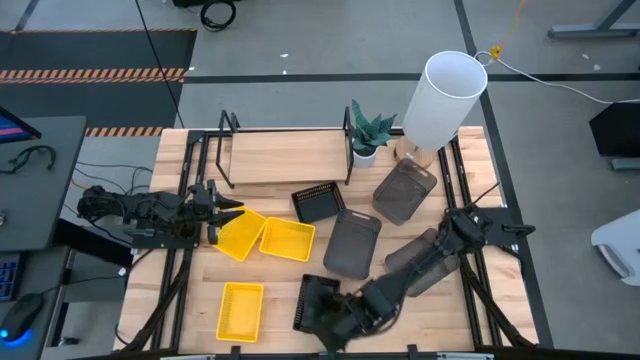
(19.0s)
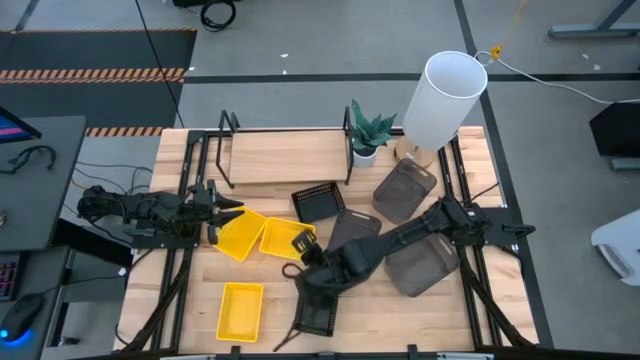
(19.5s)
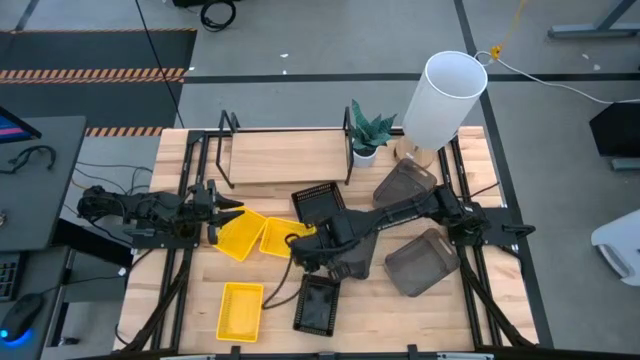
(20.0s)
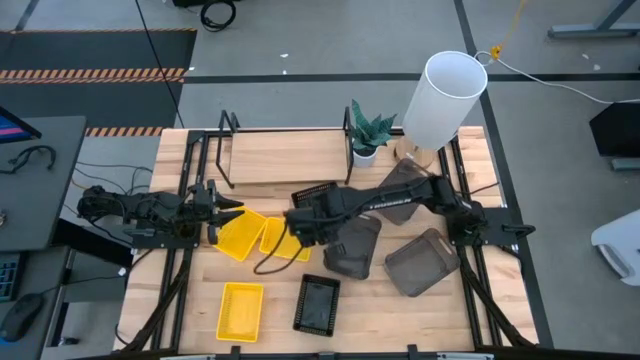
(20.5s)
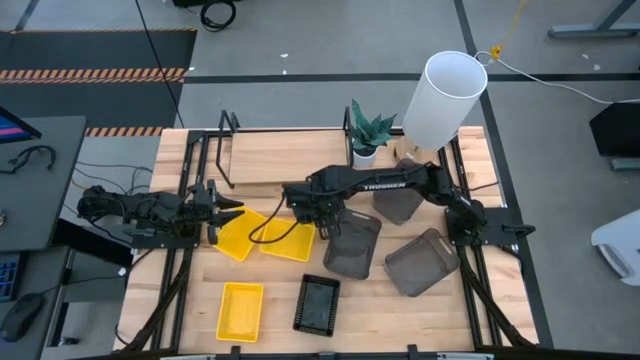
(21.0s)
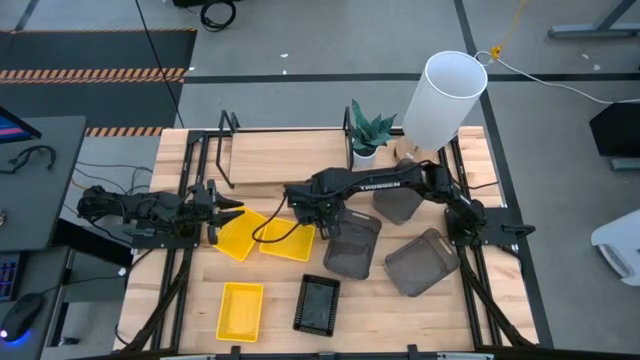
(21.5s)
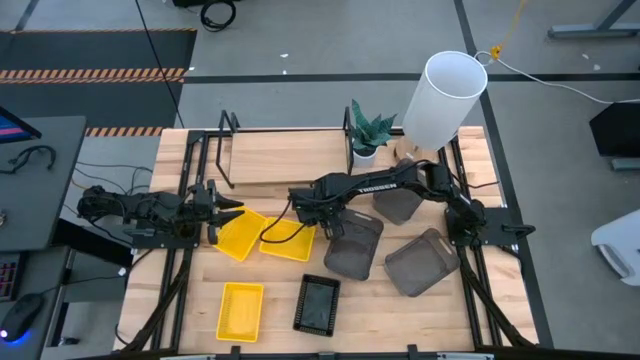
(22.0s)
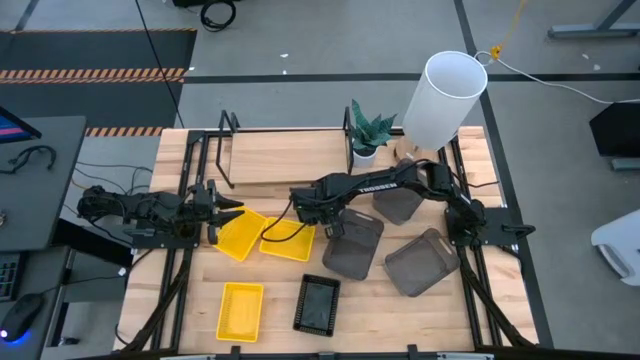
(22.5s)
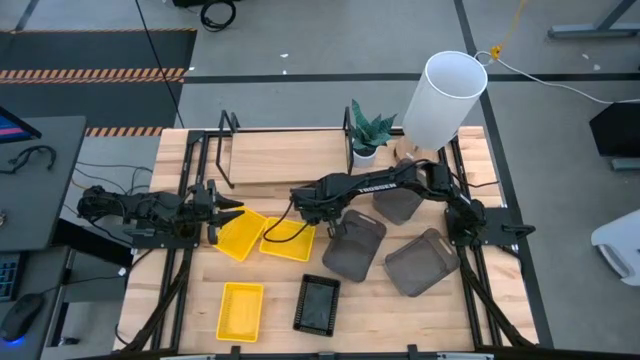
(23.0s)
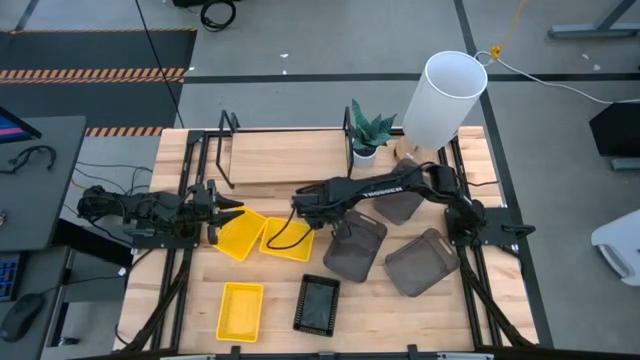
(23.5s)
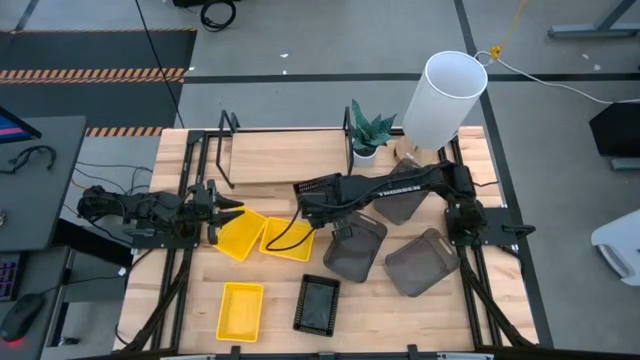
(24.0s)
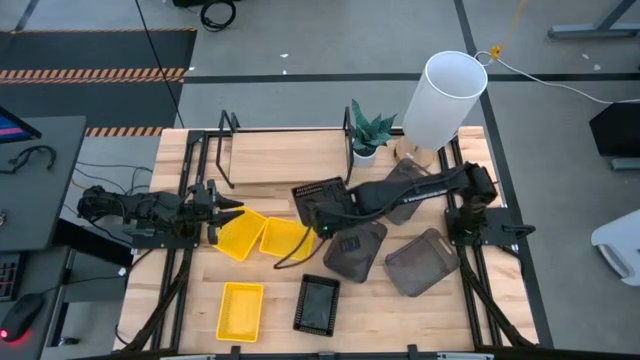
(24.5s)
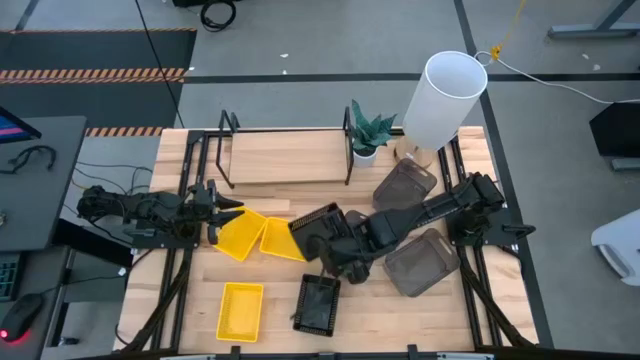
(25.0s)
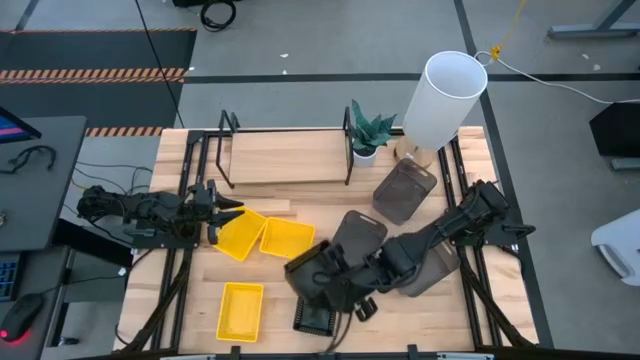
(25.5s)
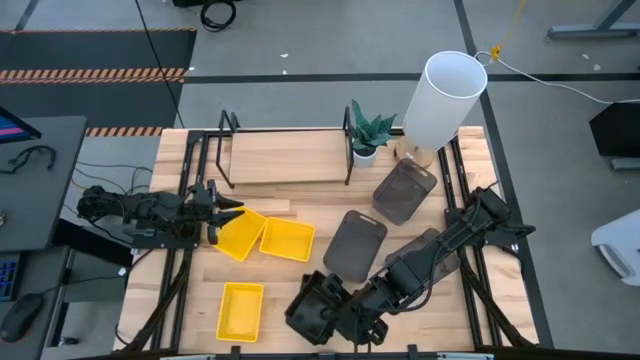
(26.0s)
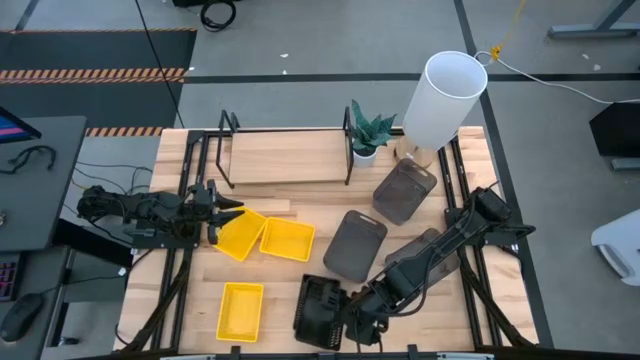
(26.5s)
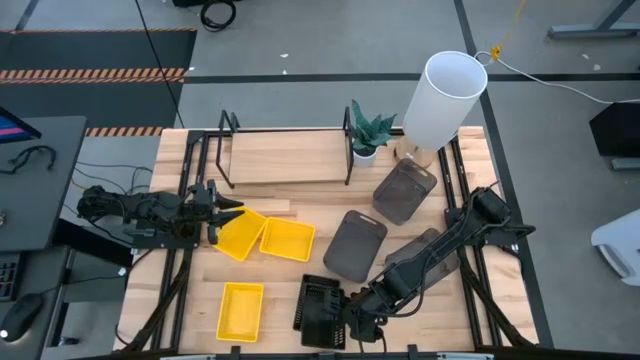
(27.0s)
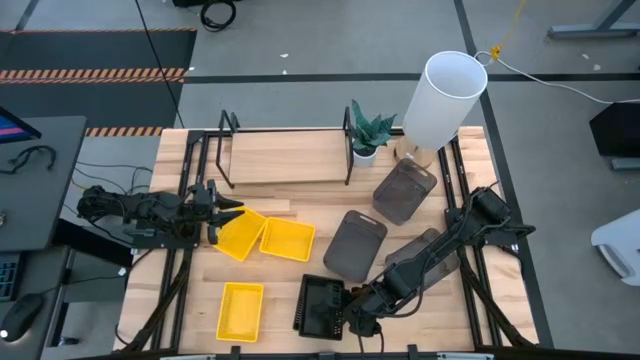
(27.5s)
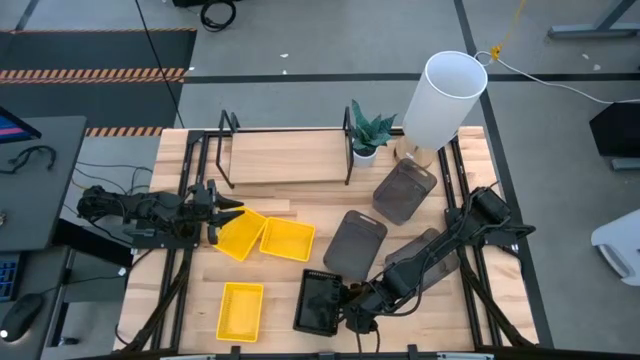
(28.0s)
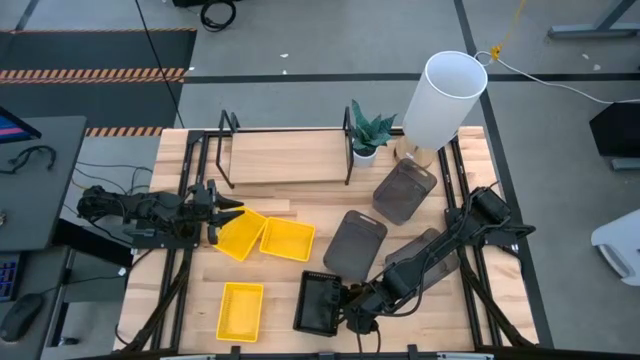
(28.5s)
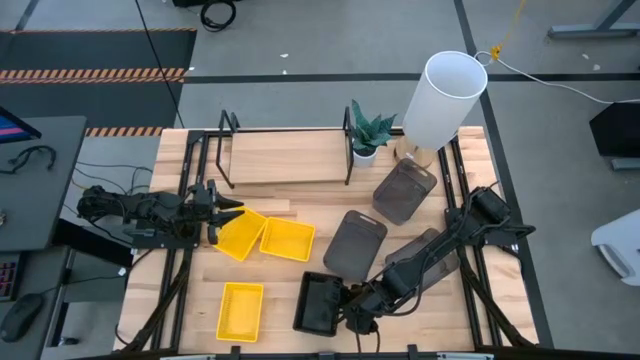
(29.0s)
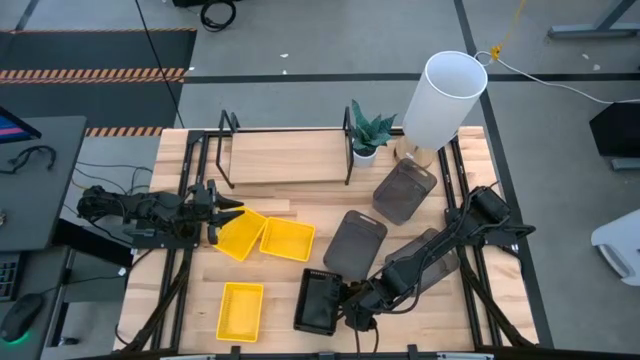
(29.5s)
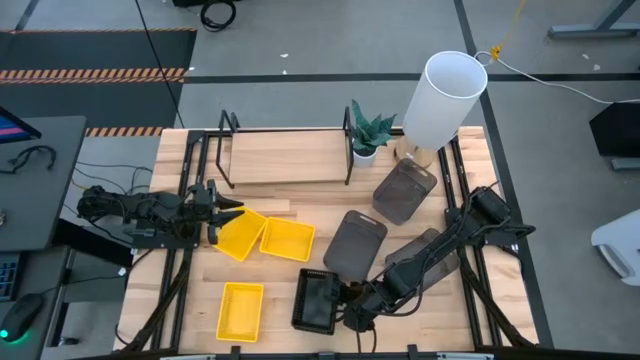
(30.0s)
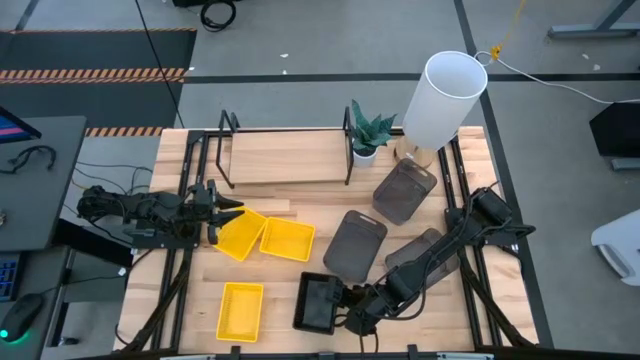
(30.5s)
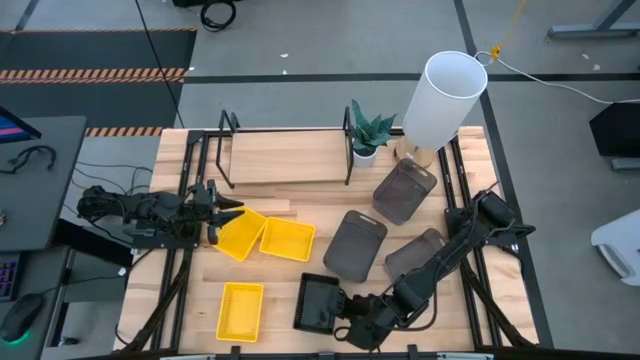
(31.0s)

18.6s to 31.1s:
Task: Stack baskets on shelf by color
Stack the top black bin on the bottom small black bin

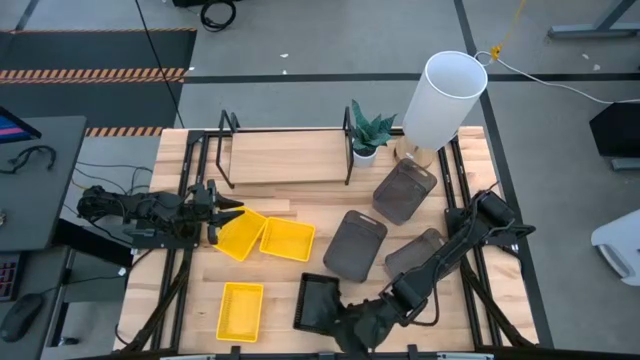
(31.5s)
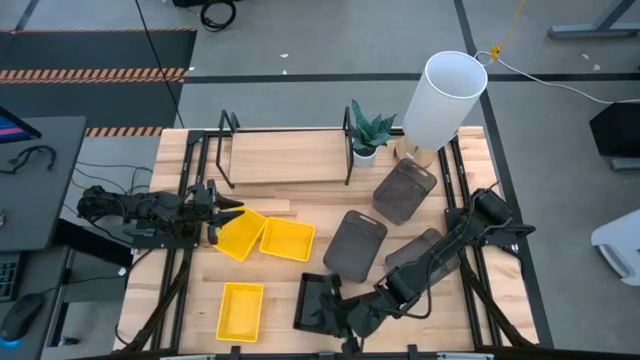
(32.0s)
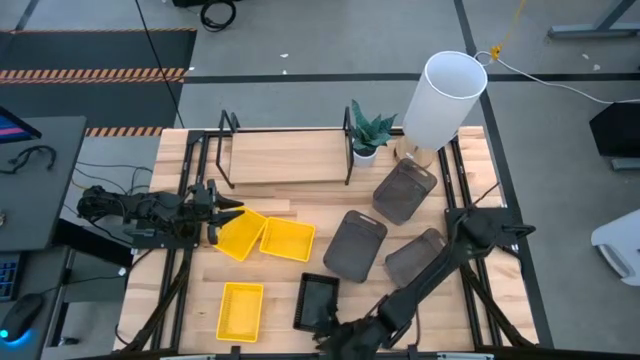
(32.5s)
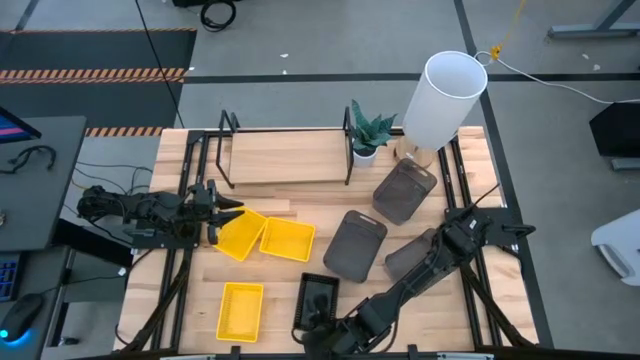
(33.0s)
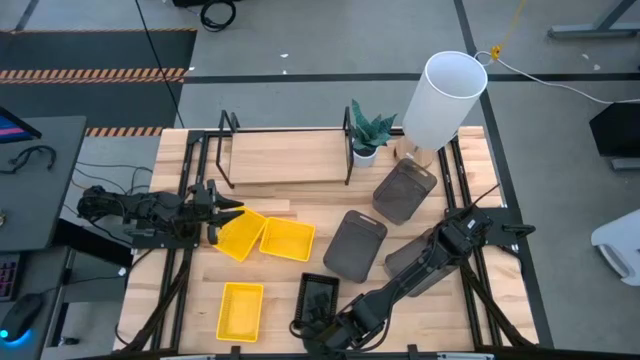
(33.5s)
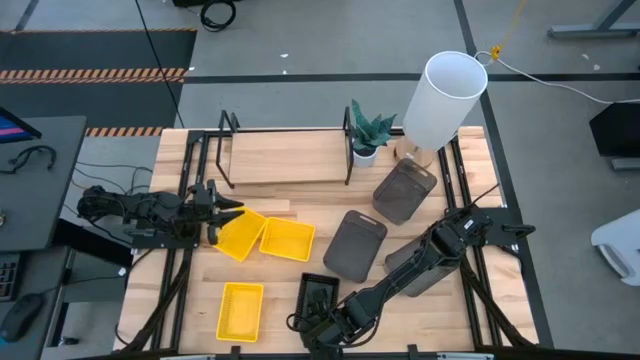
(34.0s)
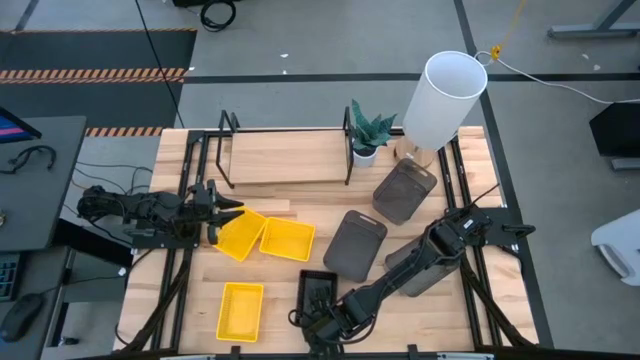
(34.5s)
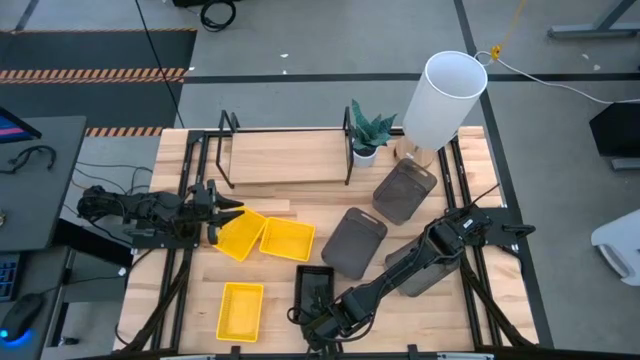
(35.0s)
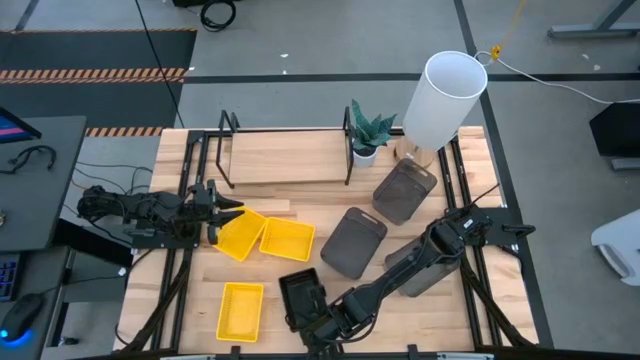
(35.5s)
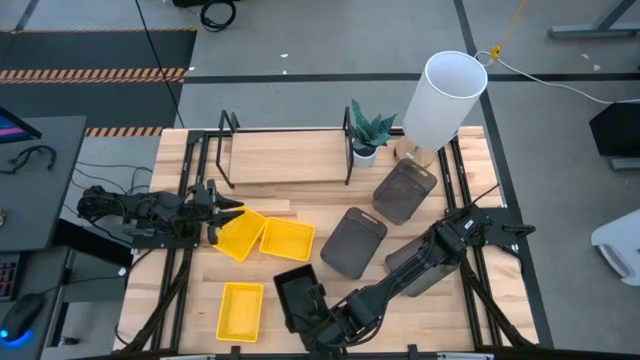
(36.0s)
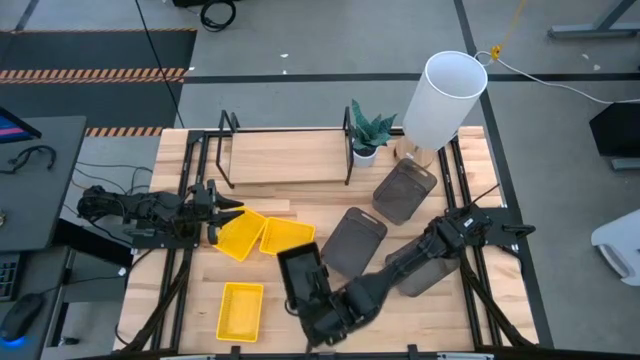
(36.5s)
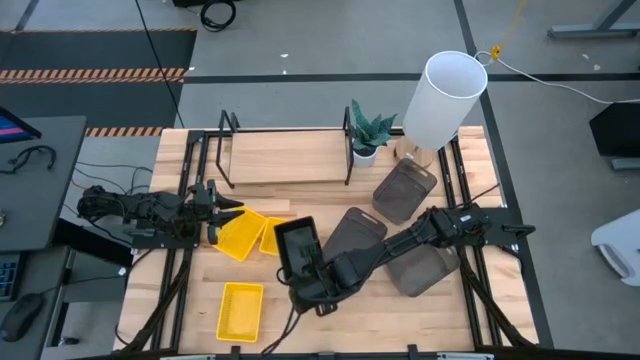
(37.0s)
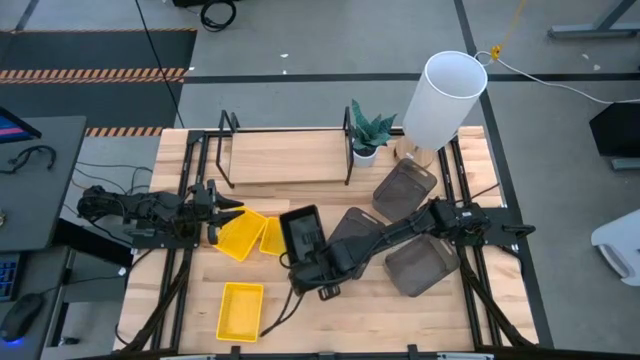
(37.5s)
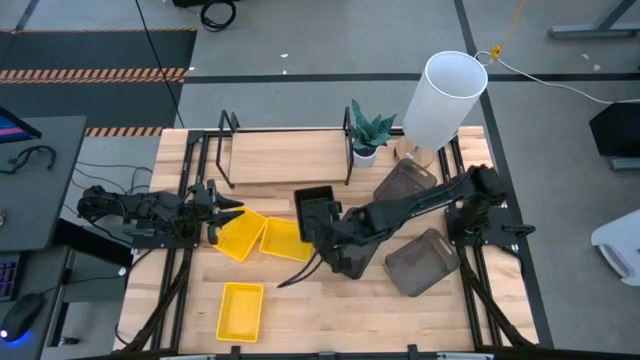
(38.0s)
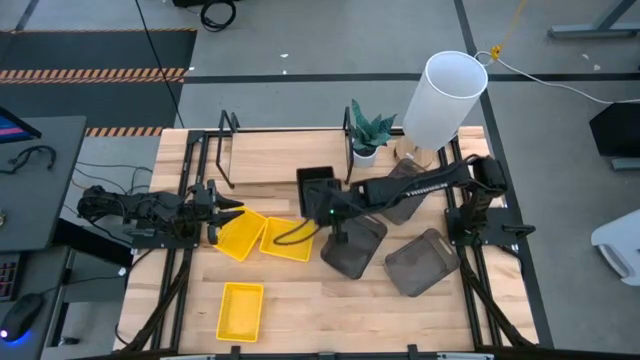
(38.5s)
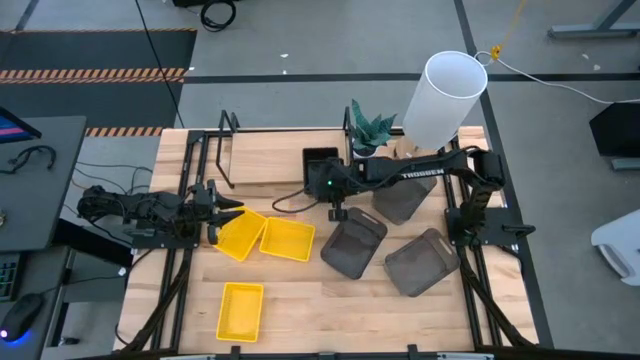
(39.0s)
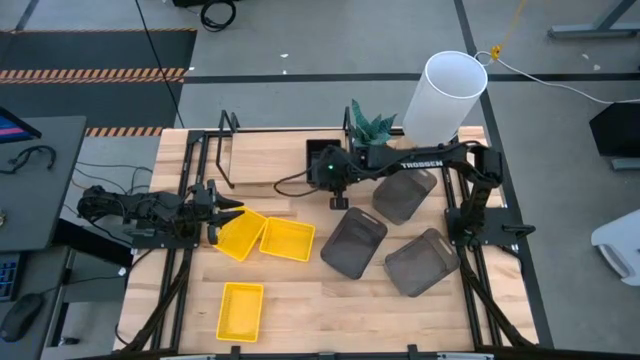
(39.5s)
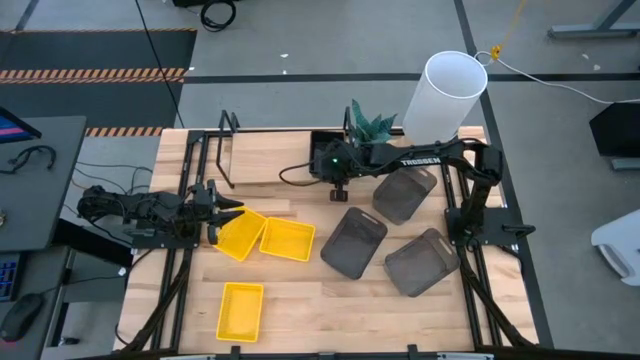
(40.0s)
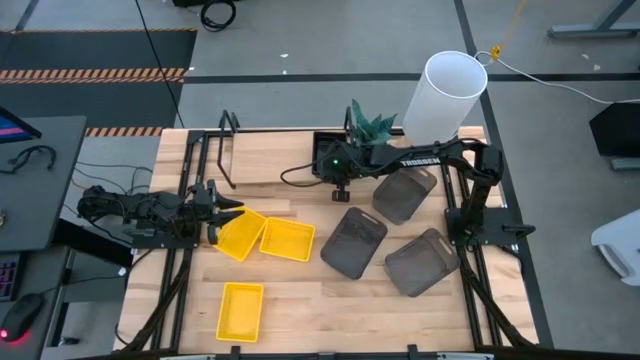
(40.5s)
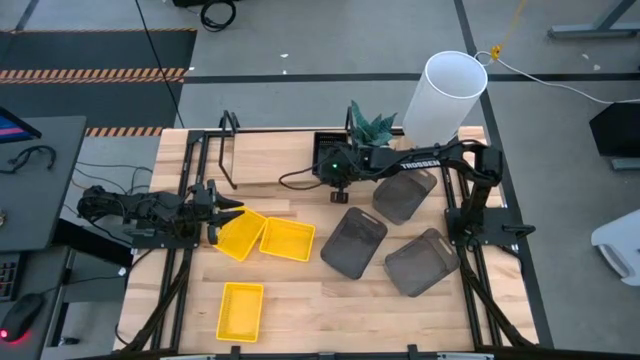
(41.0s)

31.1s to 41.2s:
Put the stacked black bins on the shelf
